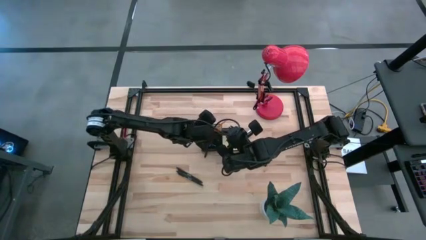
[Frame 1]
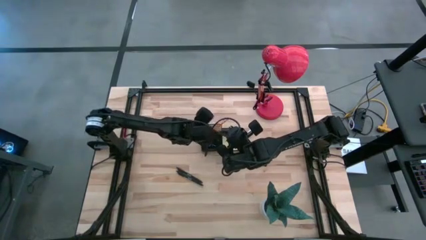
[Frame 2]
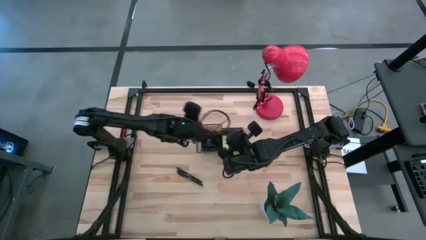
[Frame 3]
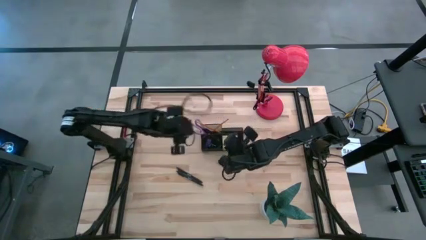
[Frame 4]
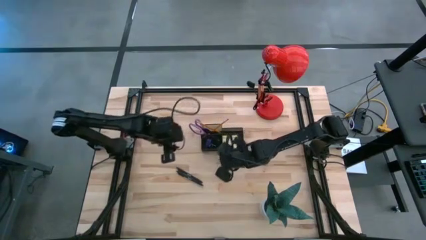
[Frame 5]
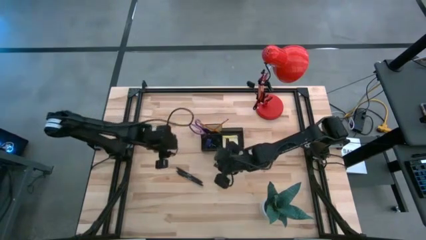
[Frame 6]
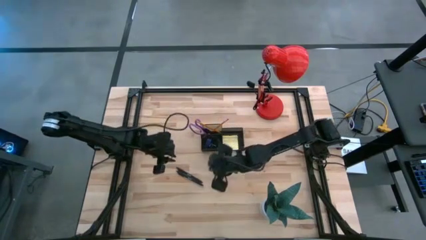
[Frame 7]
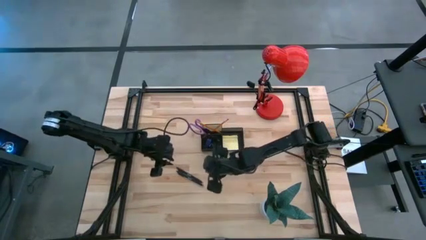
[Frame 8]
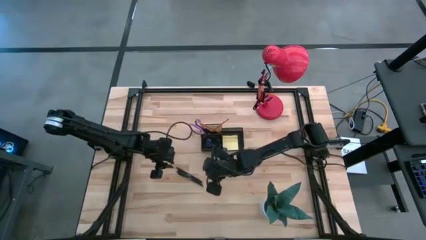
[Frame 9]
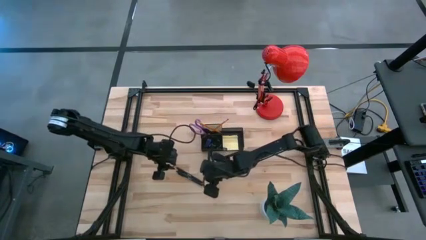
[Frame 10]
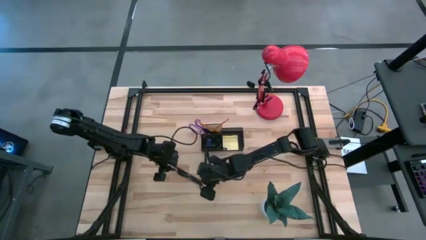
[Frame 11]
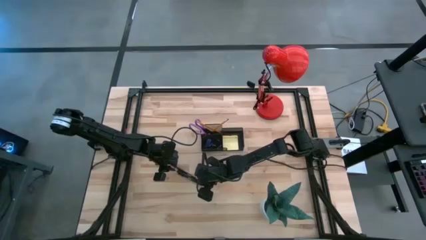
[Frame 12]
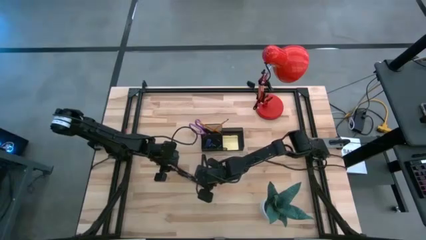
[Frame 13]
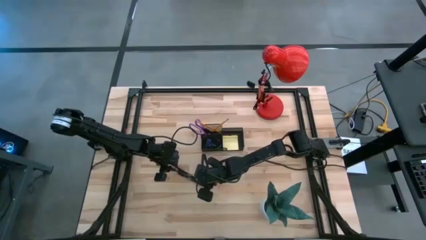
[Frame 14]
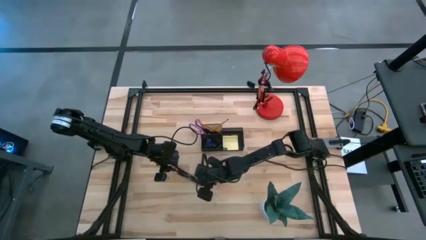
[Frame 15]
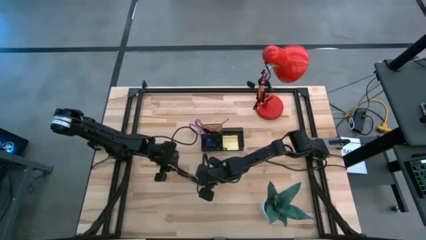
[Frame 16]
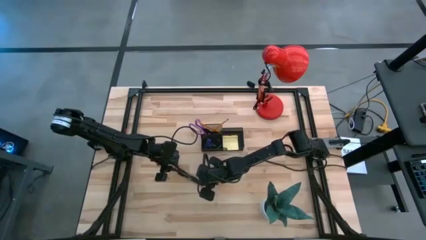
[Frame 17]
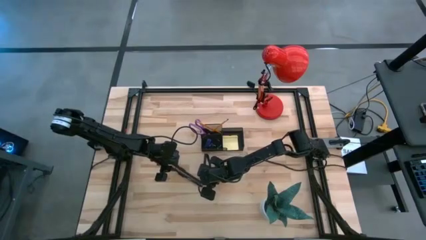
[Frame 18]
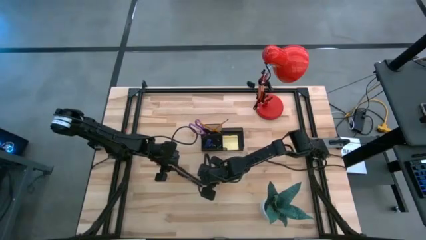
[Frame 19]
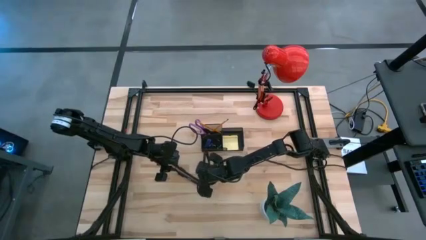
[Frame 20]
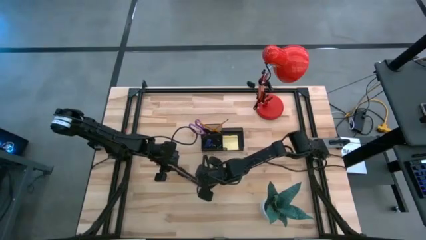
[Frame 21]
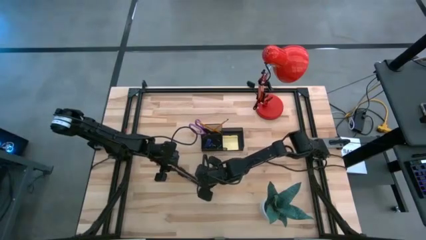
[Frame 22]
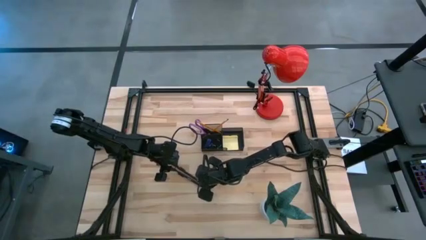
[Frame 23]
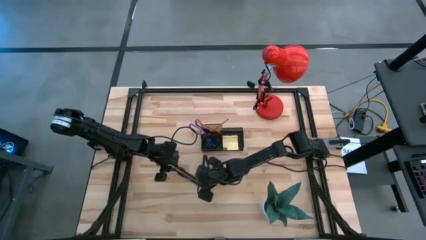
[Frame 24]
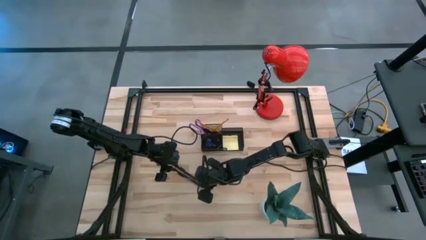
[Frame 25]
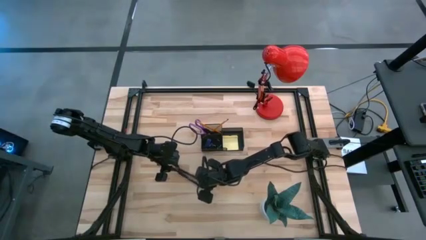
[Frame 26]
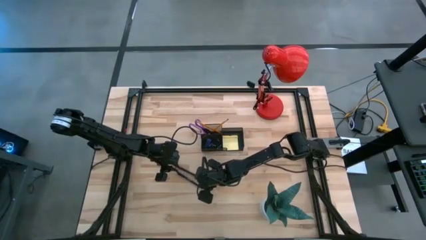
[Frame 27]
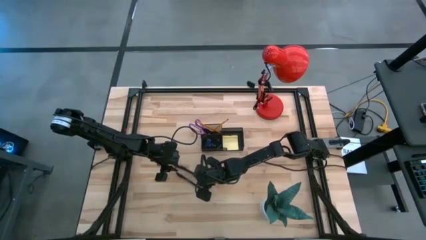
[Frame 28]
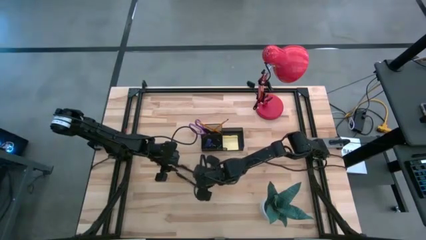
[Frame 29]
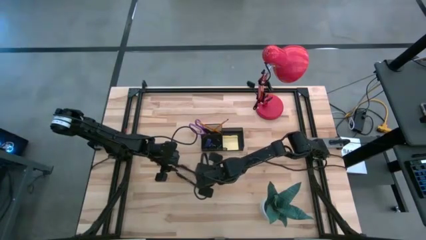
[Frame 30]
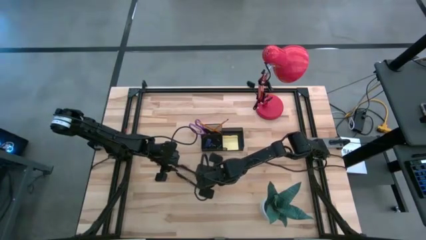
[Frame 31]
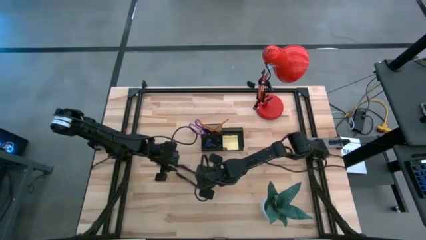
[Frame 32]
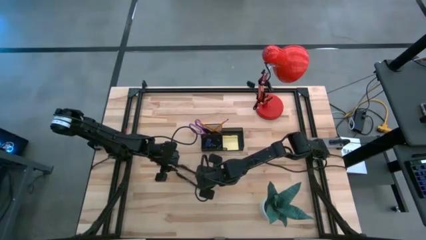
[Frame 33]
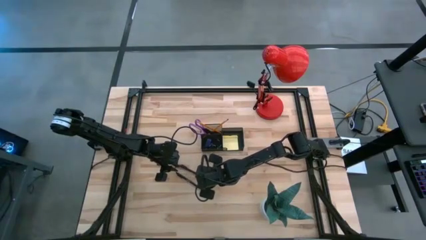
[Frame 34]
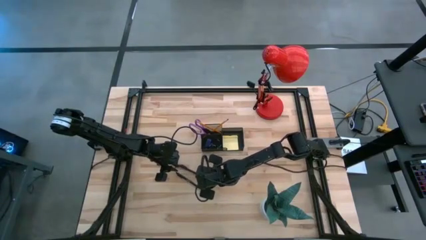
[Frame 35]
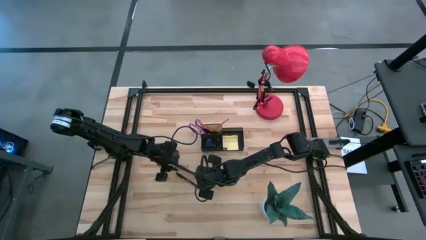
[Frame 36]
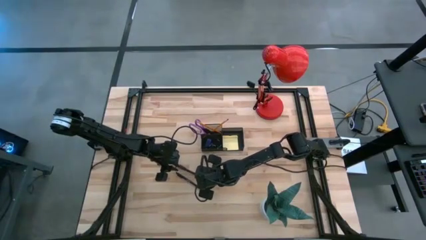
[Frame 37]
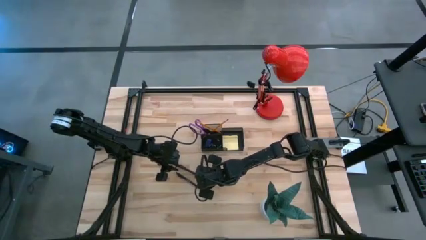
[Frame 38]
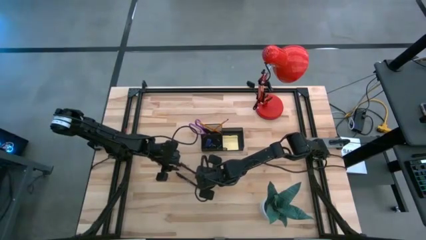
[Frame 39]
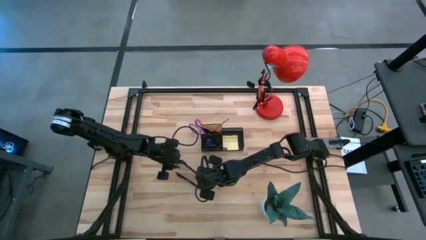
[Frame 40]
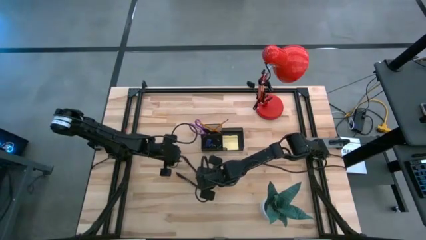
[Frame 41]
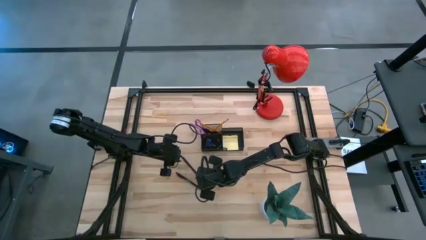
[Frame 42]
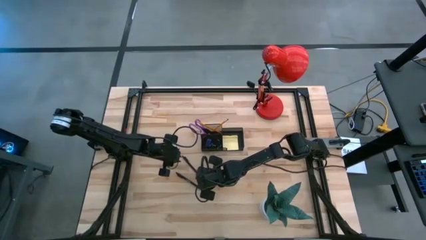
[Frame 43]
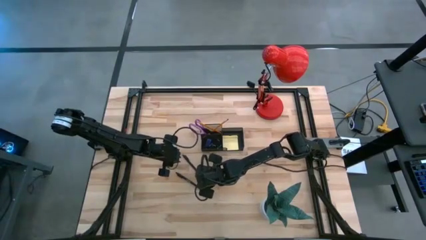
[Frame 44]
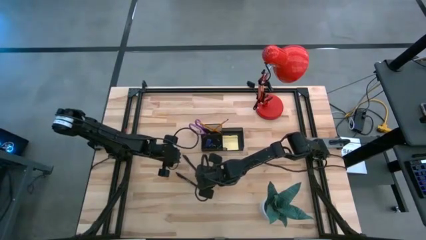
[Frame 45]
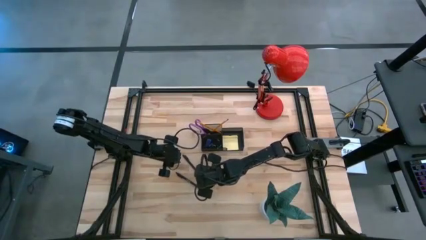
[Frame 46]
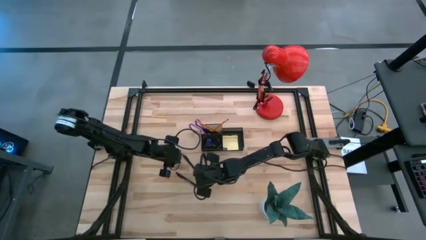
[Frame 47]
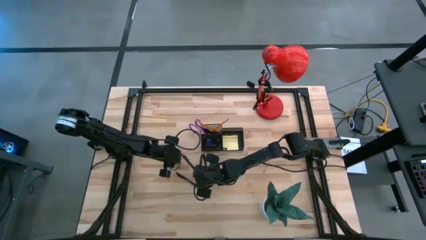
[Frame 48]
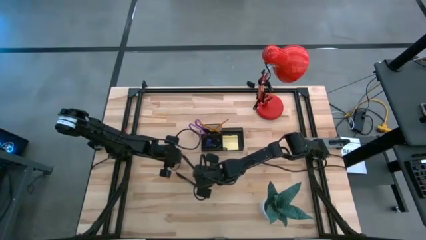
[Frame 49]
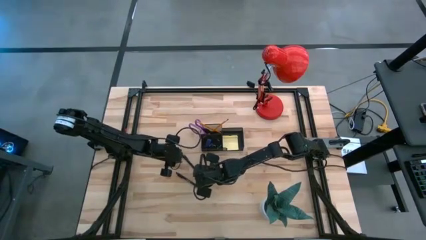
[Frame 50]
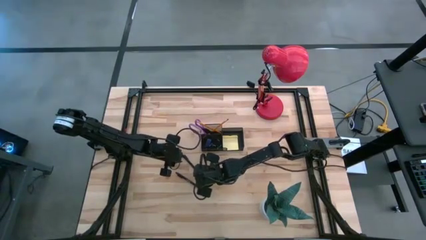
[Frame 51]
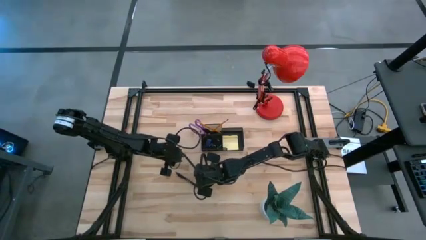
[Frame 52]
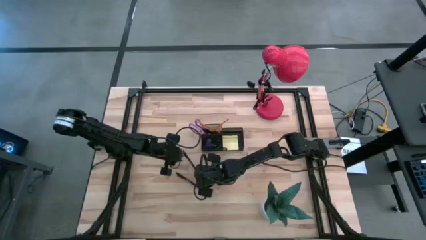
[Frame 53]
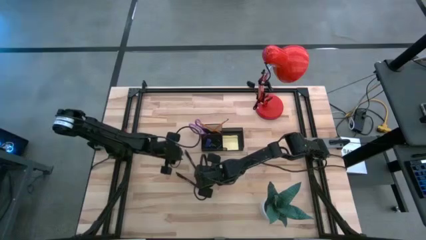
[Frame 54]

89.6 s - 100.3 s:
Task: Pick and place office supplies into organizer
Put the top black pen into the black desk organizer

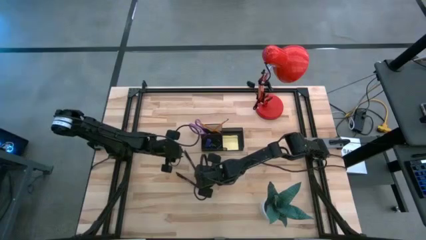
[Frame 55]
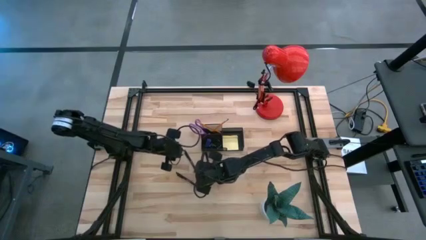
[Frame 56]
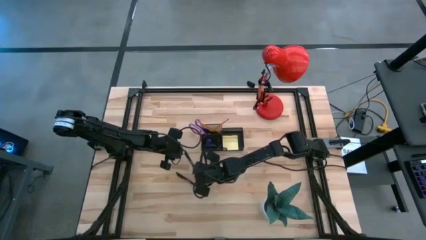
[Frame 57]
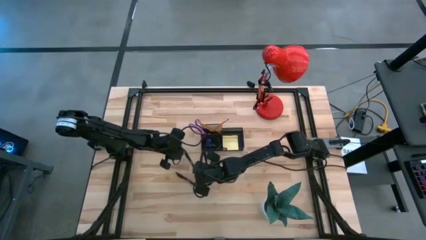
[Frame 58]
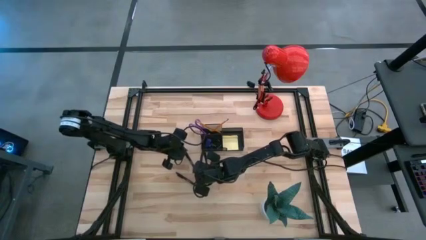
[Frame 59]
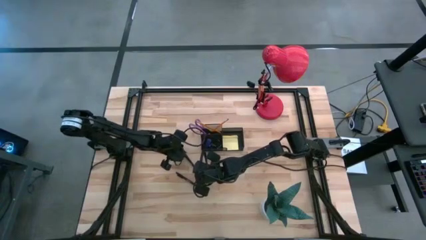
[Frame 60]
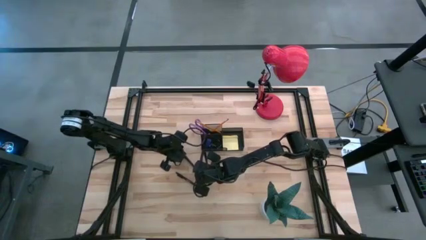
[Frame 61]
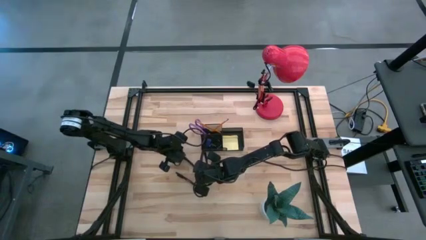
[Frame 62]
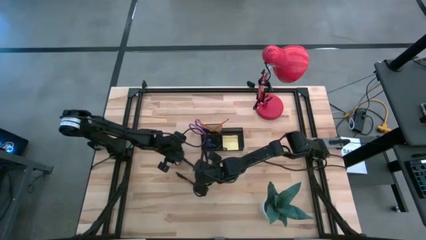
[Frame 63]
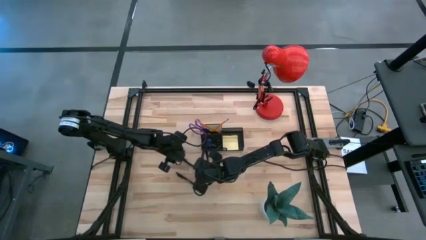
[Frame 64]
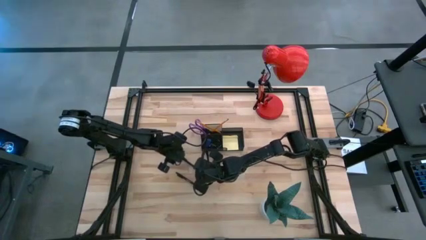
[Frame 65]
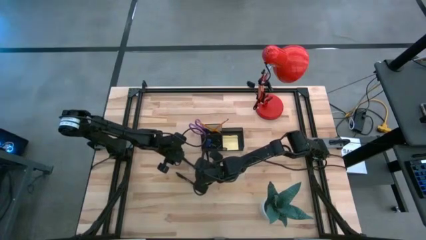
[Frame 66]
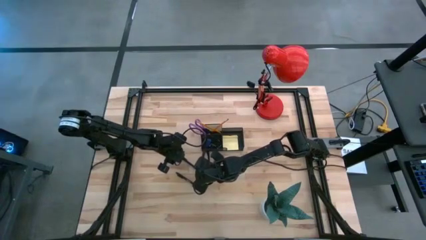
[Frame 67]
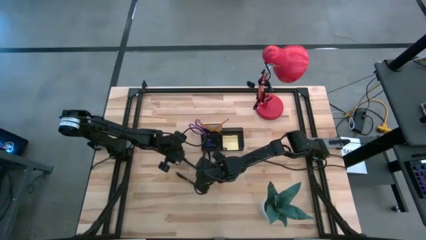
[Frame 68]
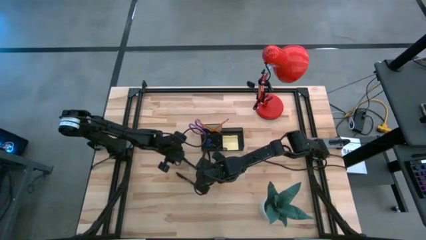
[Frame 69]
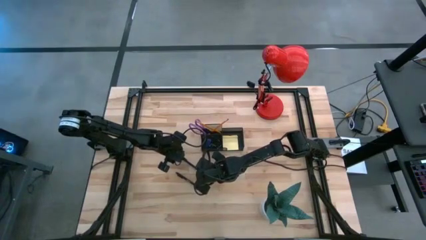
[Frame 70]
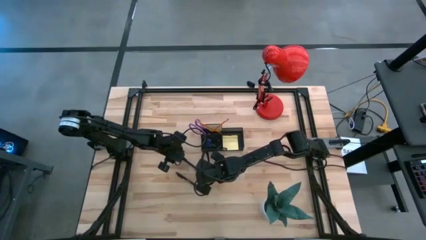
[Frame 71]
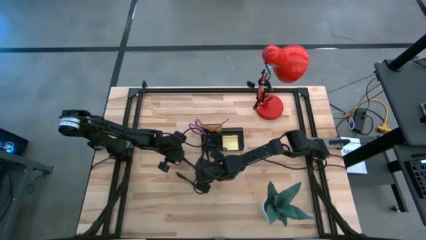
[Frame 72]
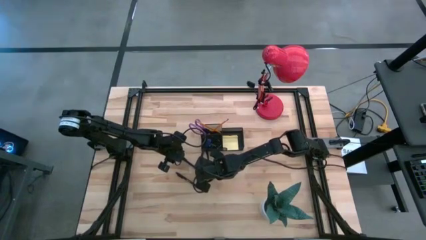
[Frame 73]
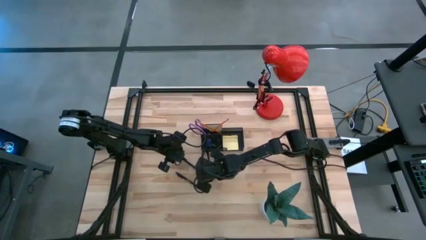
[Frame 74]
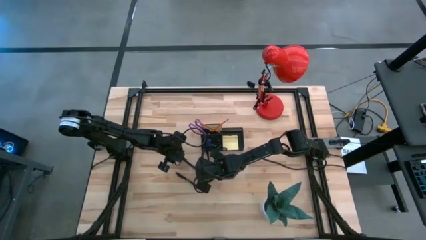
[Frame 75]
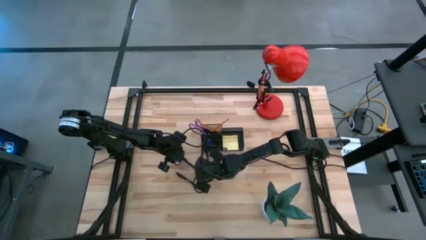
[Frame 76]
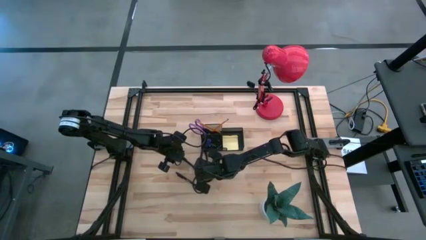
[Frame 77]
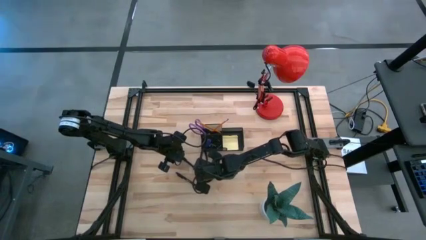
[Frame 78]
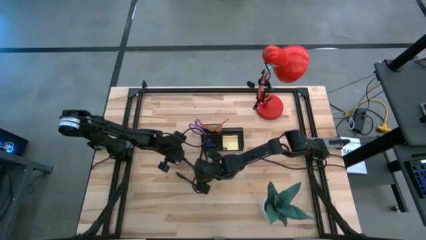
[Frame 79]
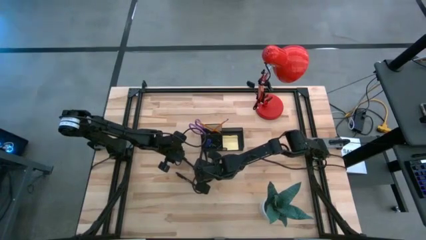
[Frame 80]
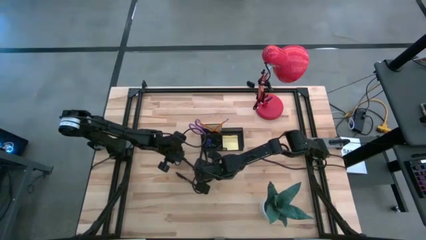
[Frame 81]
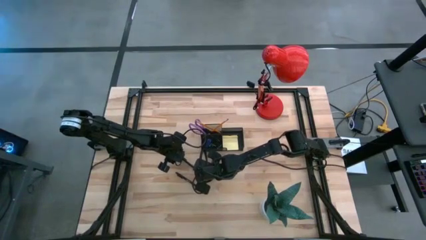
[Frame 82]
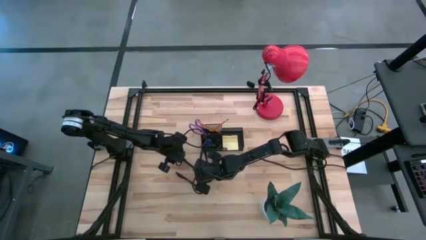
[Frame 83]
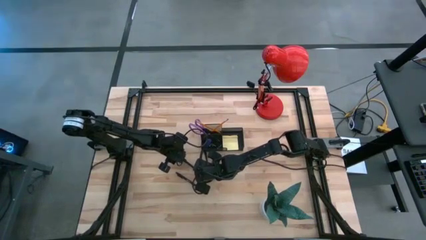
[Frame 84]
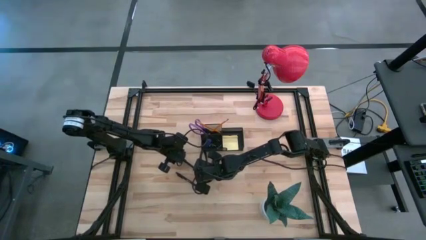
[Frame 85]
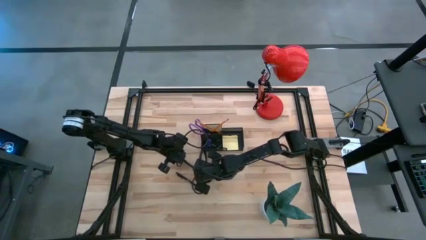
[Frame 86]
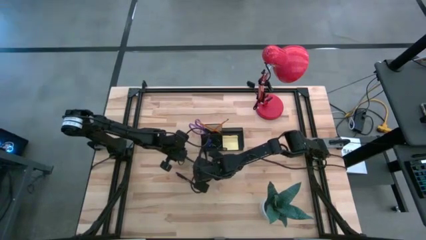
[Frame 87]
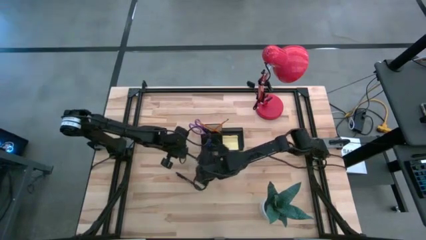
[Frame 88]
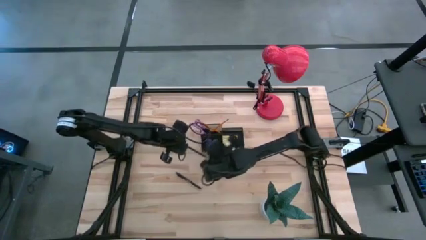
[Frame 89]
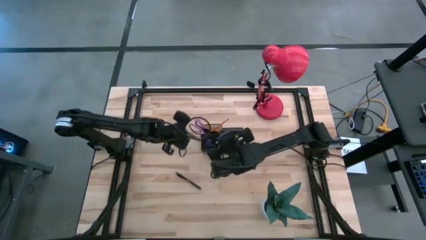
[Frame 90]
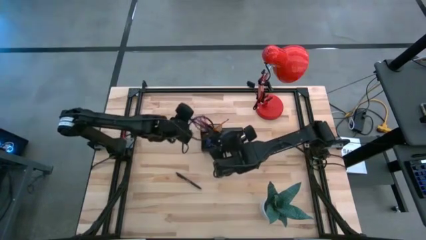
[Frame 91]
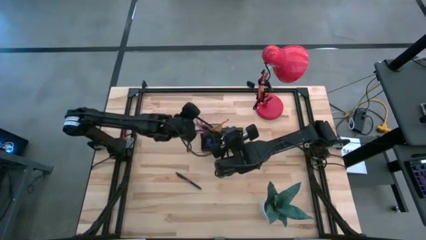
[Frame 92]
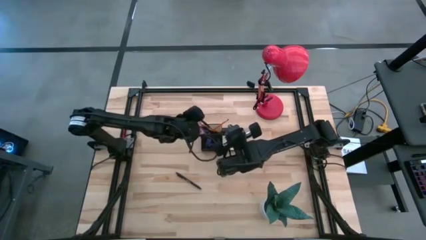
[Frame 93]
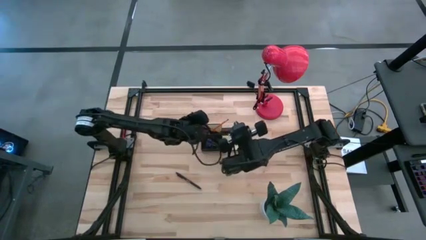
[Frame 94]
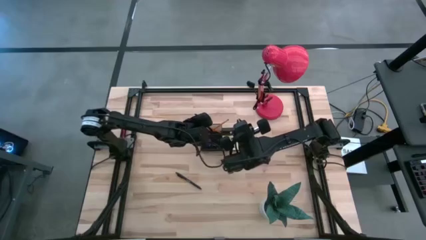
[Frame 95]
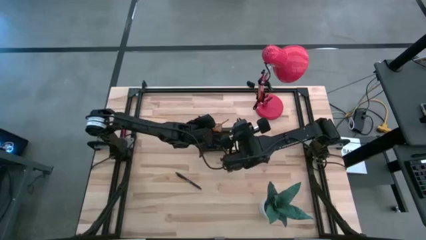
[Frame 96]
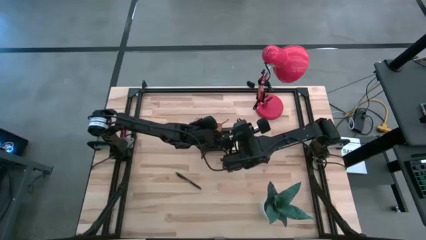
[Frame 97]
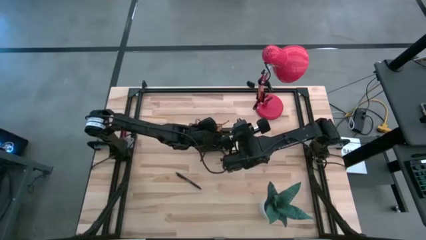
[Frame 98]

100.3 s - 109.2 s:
Put the top black pen into the black desk organizer
